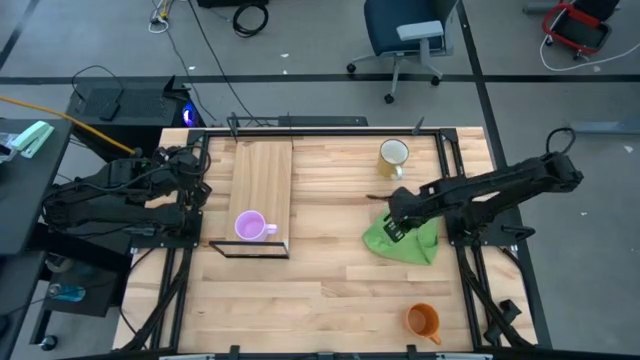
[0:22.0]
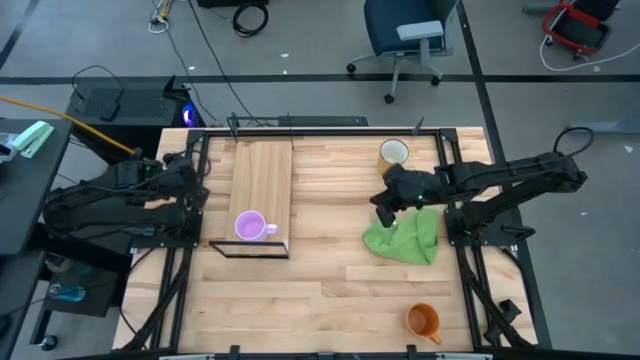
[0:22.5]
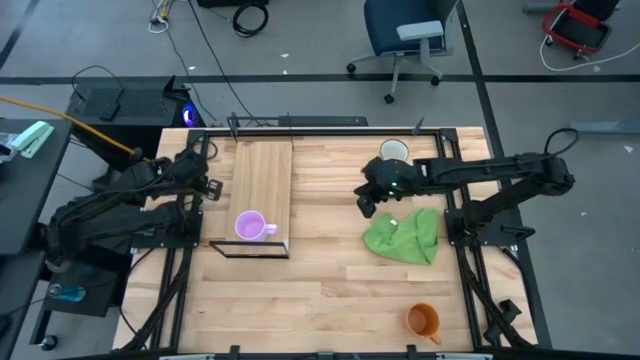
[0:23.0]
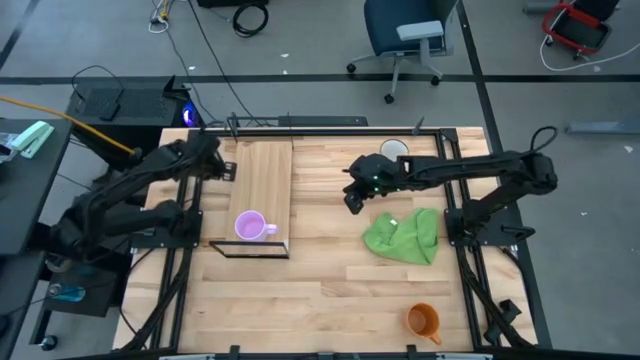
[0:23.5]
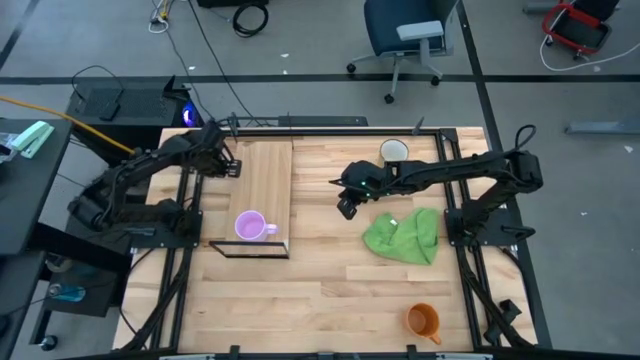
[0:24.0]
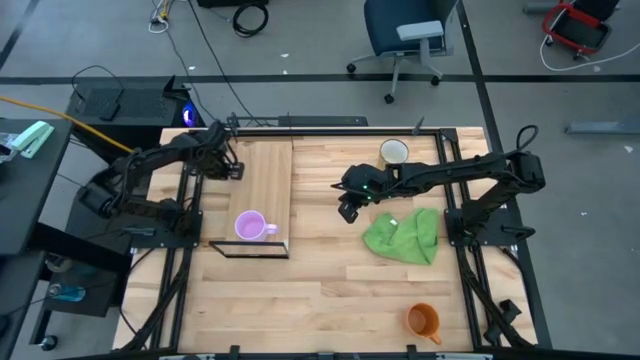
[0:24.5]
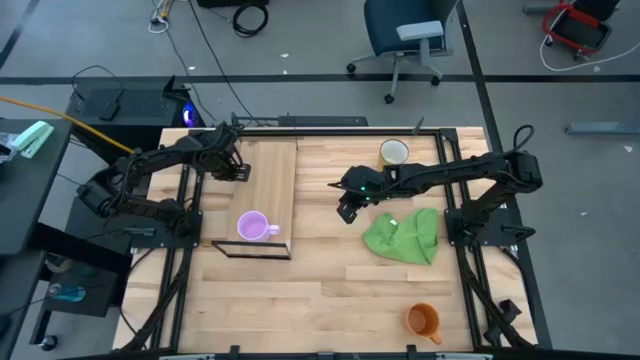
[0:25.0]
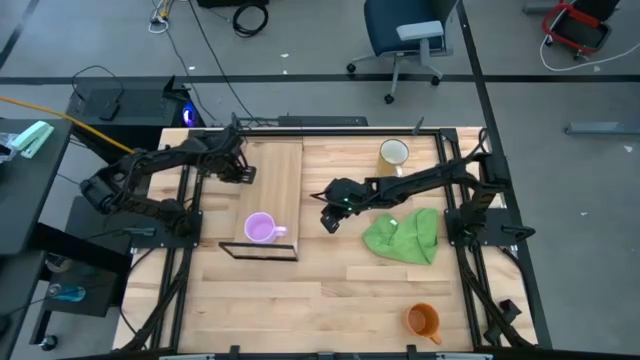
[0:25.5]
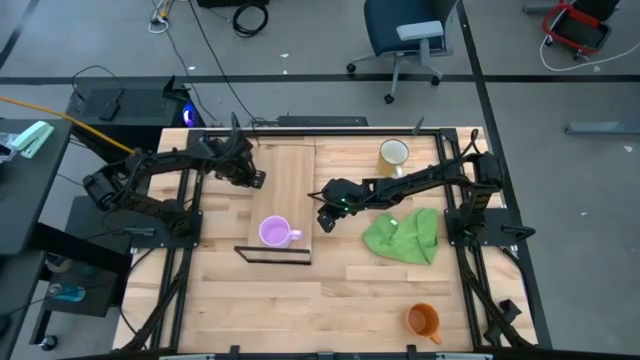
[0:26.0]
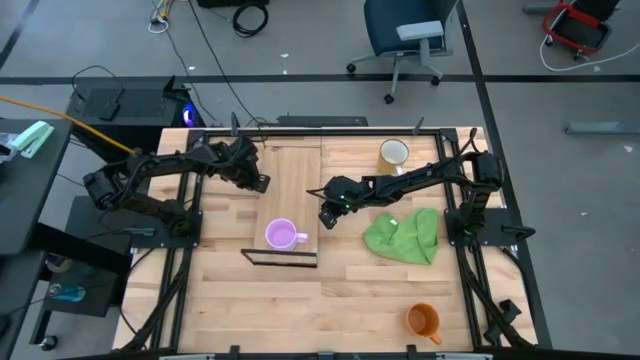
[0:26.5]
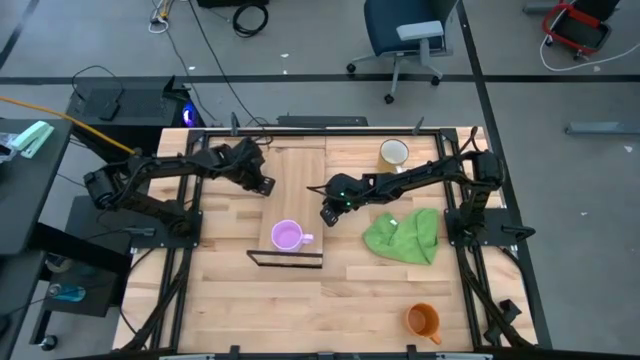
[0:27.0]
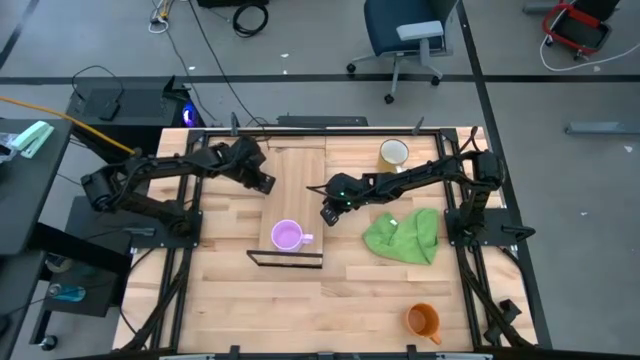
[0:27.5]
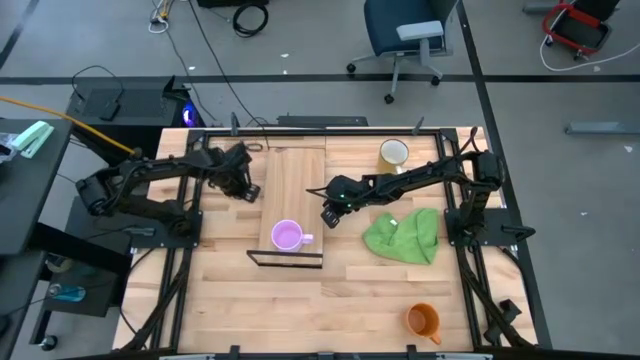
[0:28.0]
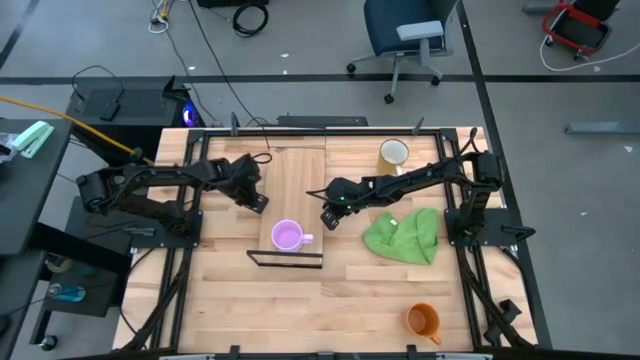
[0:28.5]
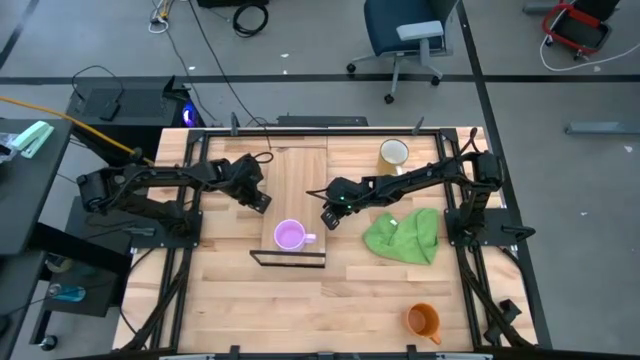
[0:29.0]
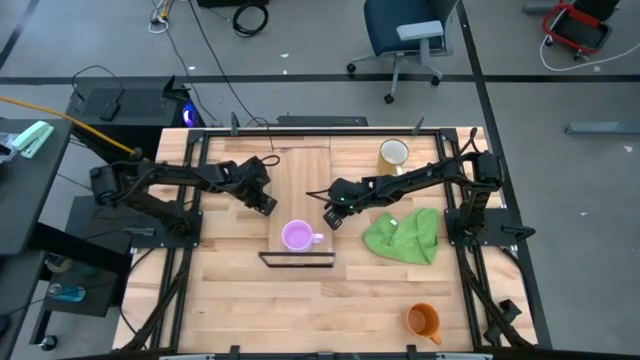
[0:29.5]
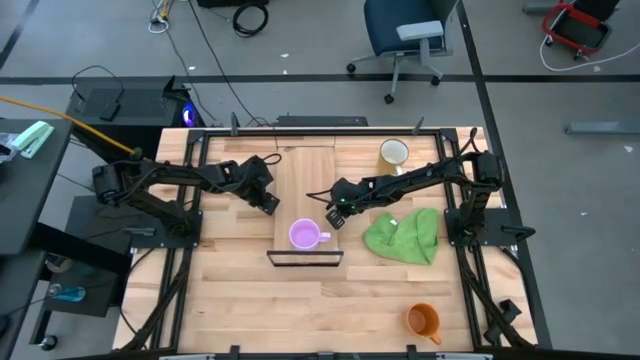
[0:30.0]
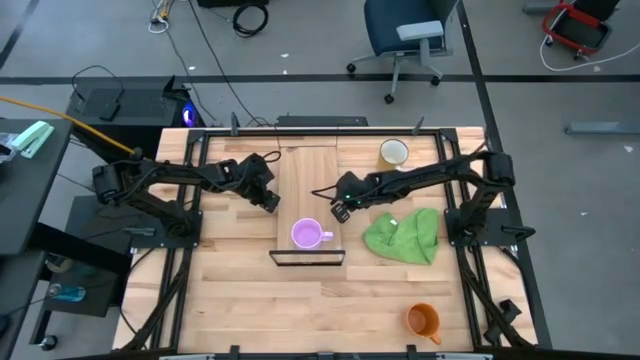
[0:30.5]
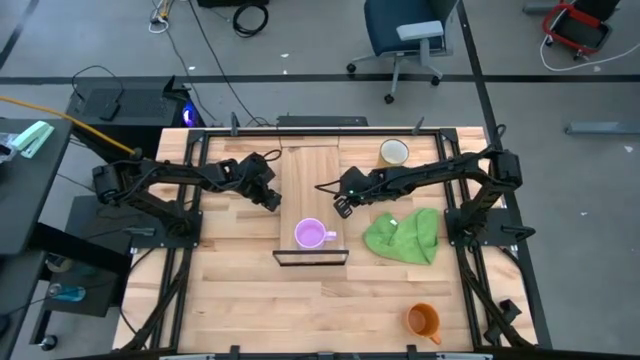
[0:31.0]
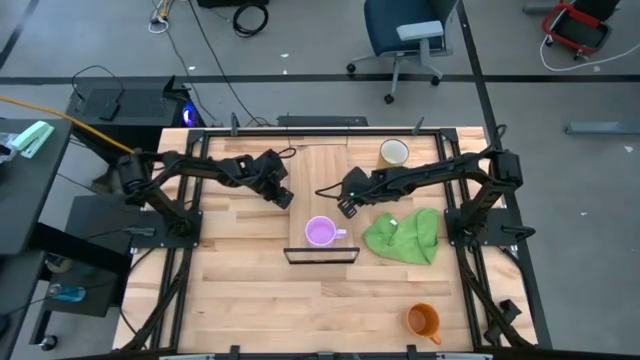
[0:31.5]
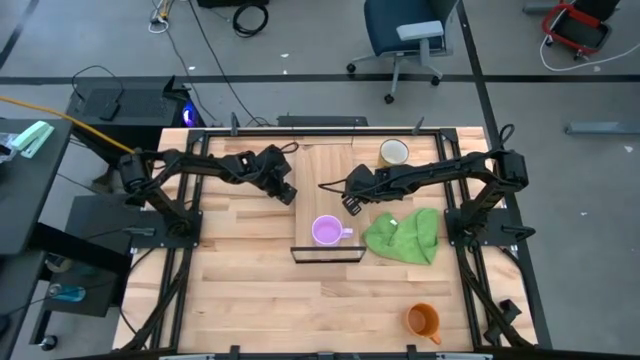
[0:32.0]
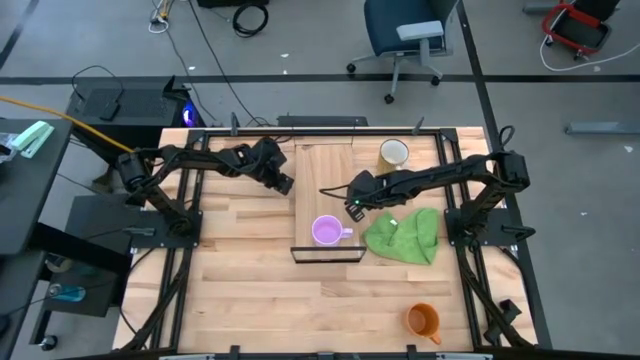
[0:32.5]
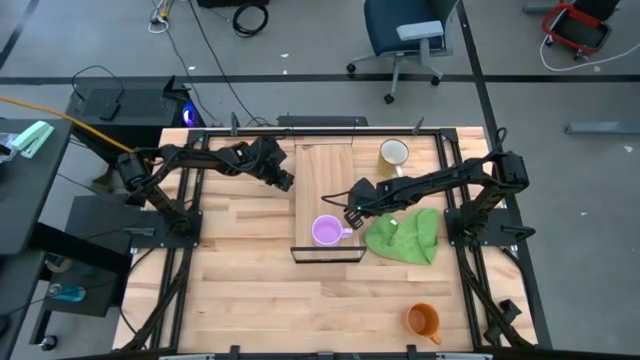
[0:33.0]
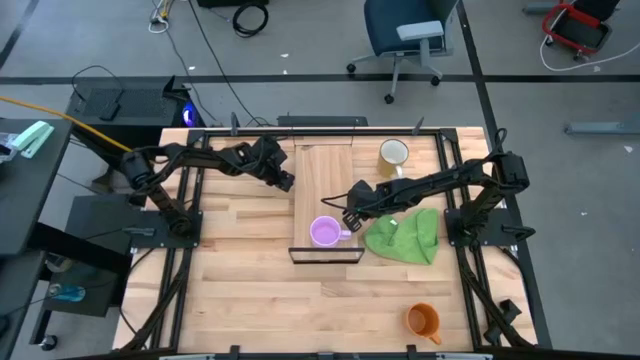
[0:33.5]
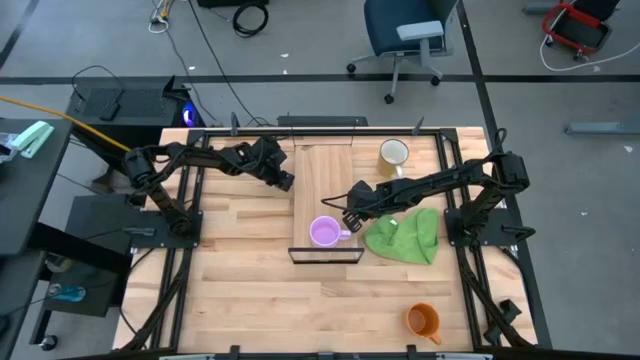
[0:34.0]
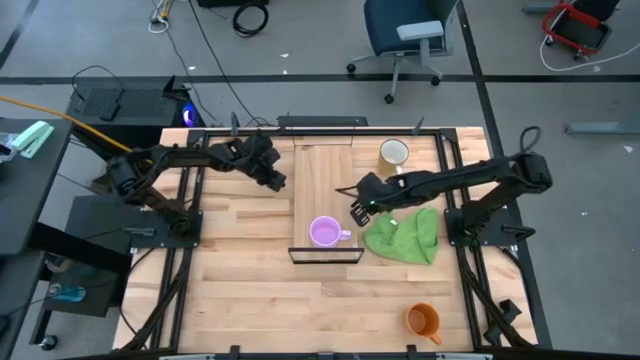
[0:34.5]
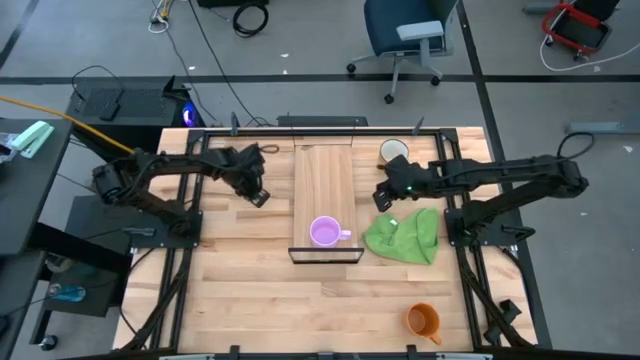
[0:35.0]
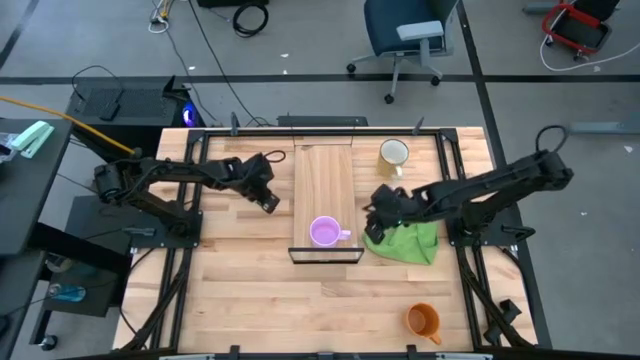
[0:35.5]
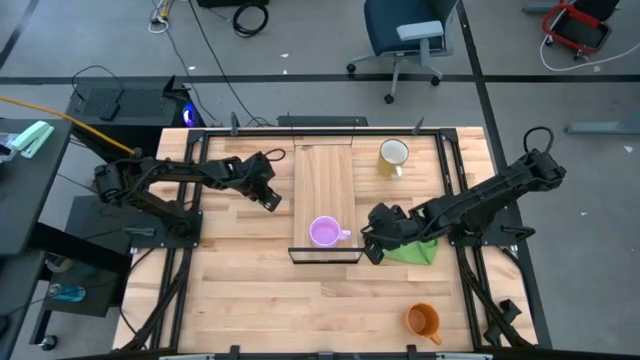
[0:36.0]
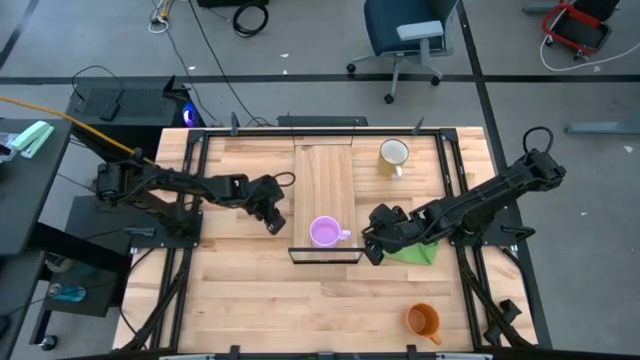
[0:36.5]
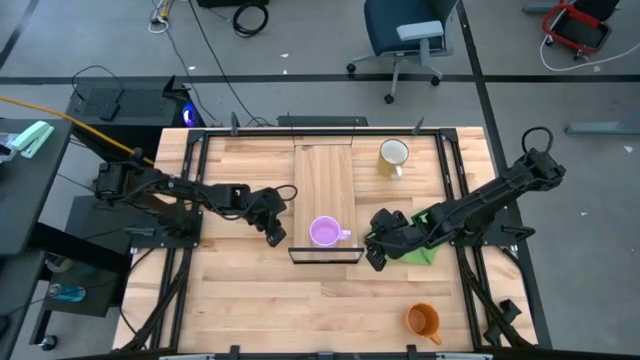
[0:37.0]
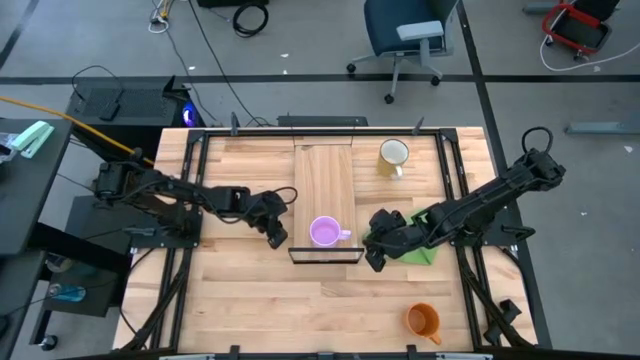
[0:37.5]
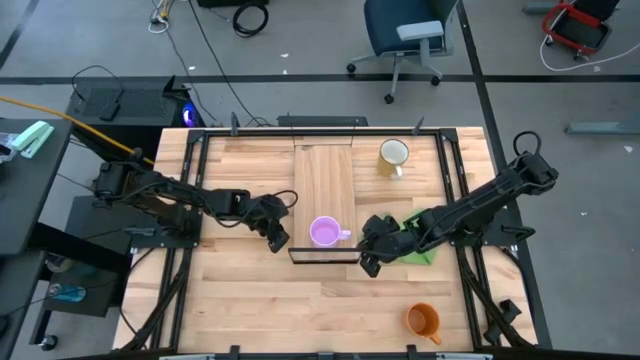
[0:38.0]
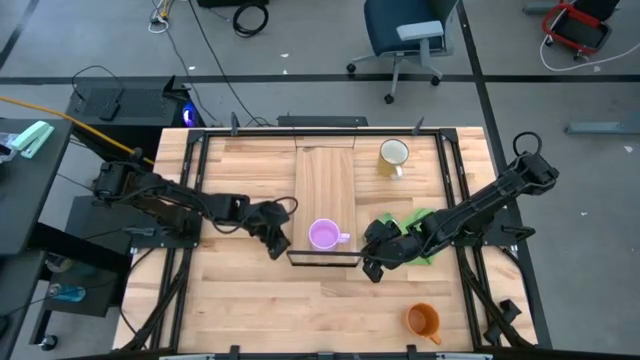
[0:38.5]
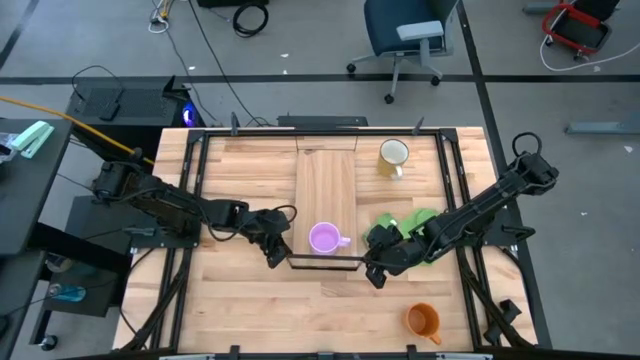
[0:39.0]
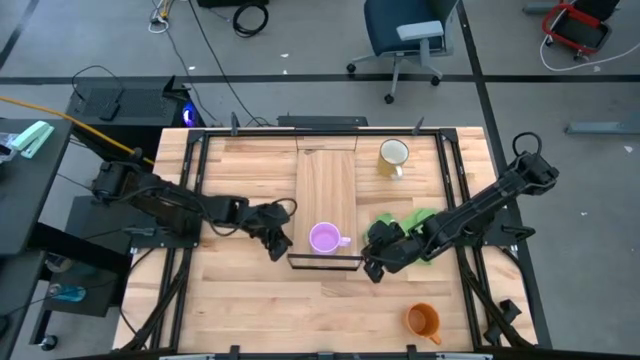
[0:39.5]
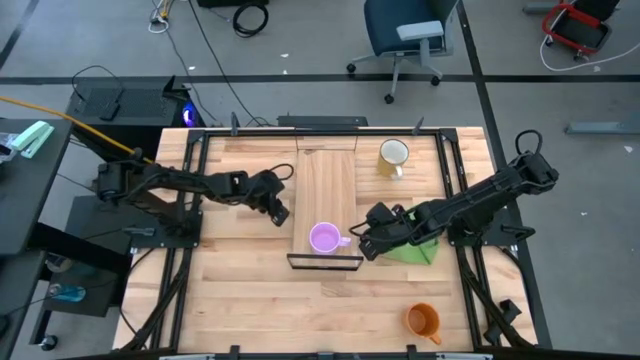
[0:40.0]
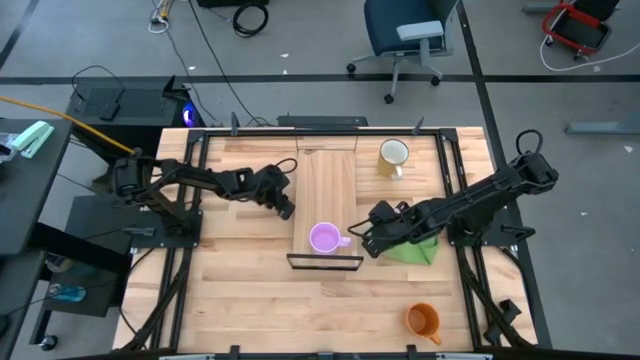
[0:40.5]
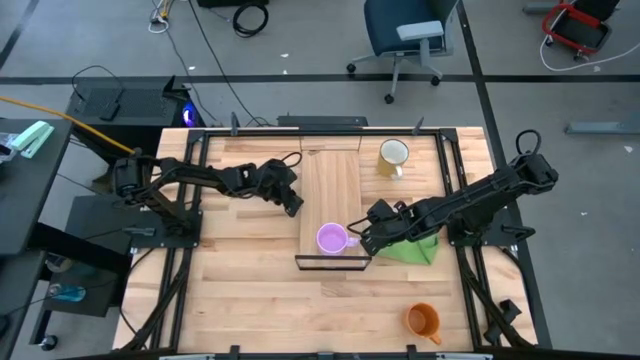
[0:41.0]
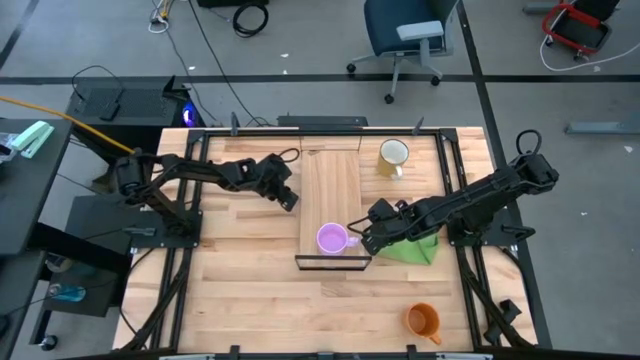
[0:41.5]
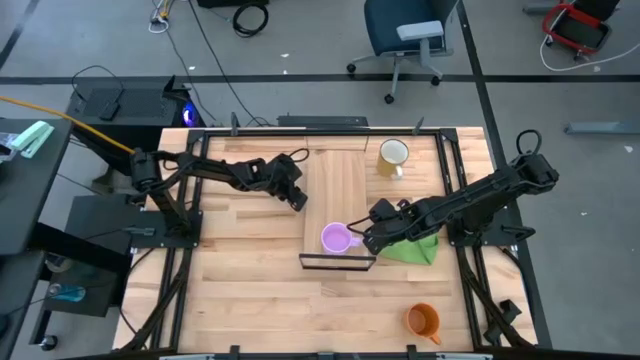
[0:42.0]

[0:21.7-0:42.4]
Task: Stack small to large cups/mugs on shelf
Move the shelf from left to the middle table

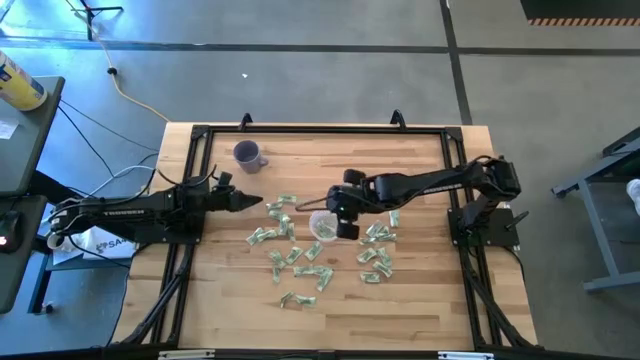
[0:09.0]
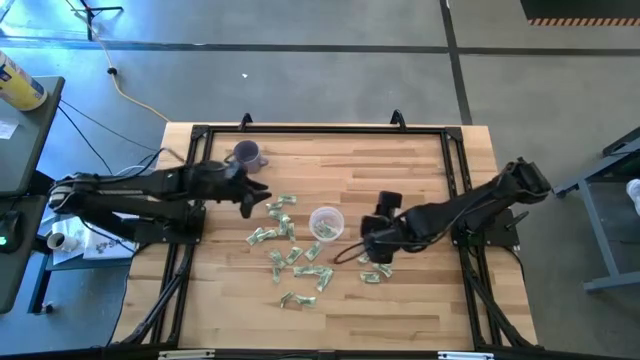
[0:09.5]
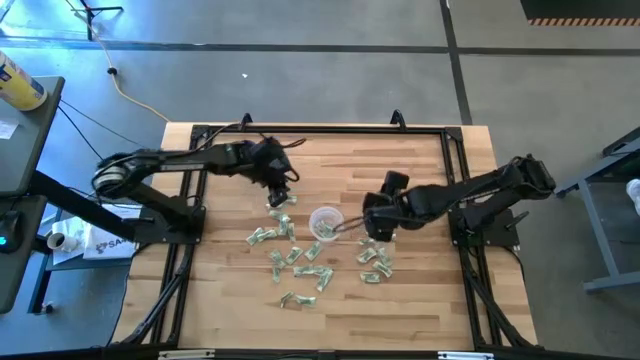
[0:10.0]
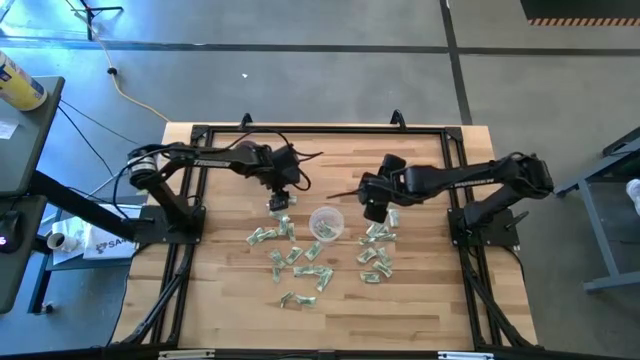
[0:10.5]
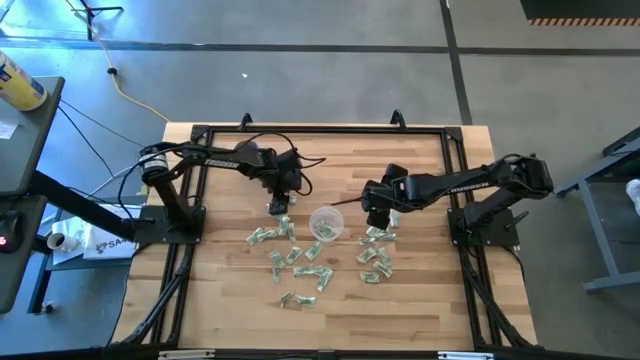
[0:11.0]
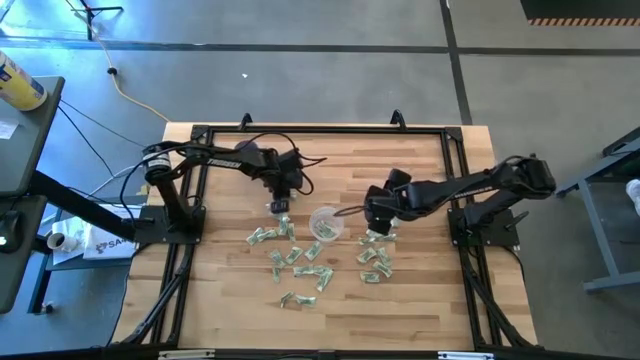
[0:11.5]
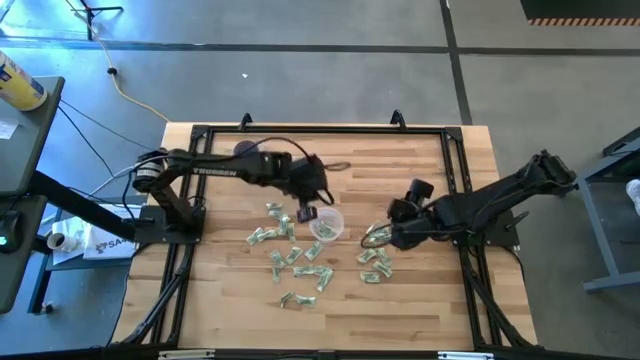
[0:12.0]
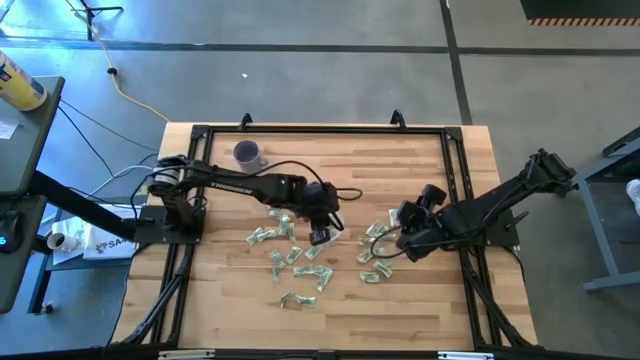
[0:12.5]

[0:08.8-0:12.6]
Task: Pick and place Stevia / Truvia into bins
Put the stevia packet into the transparent container
